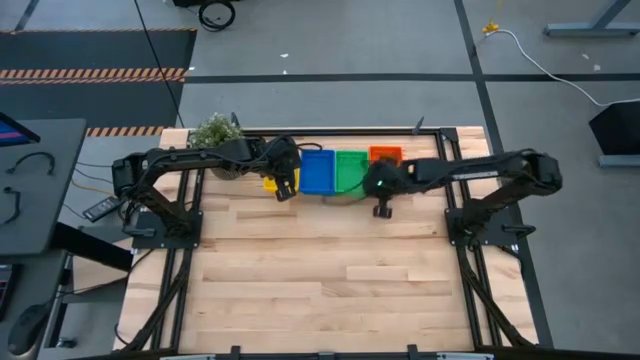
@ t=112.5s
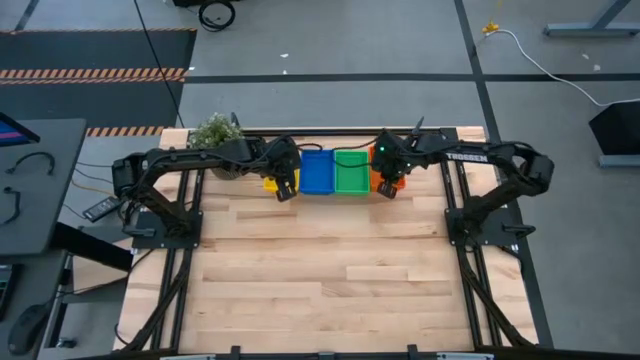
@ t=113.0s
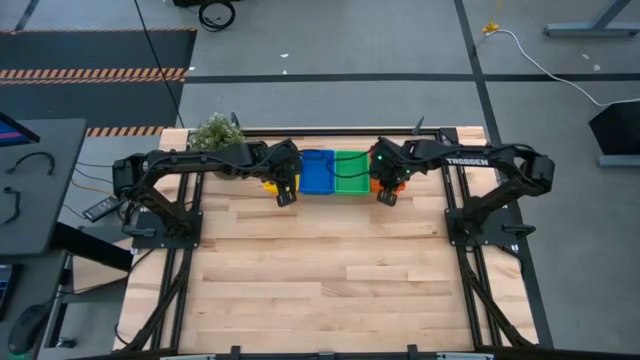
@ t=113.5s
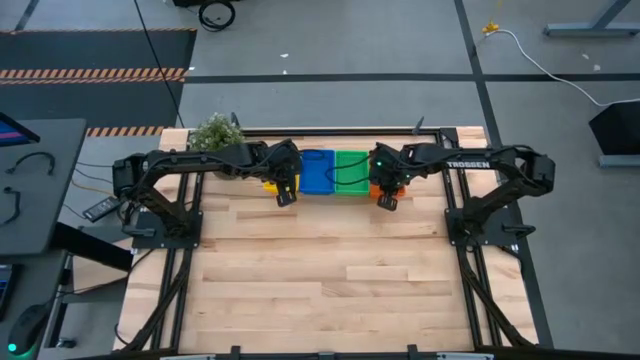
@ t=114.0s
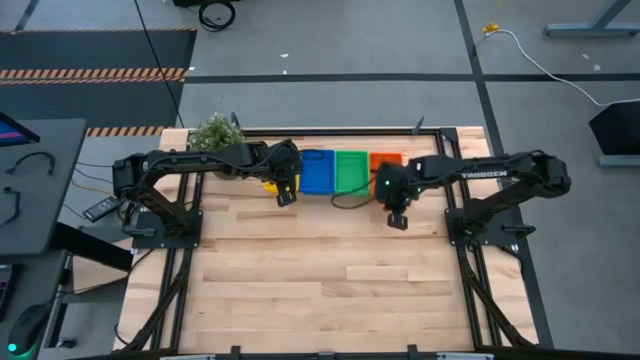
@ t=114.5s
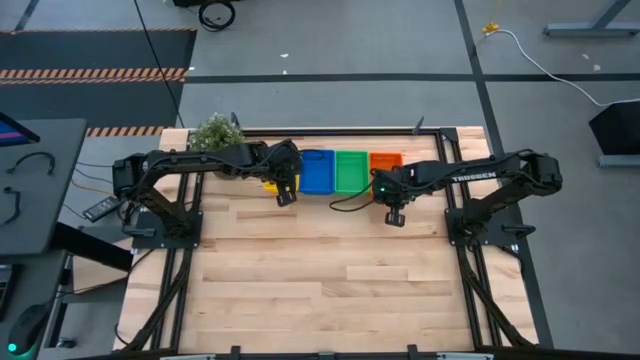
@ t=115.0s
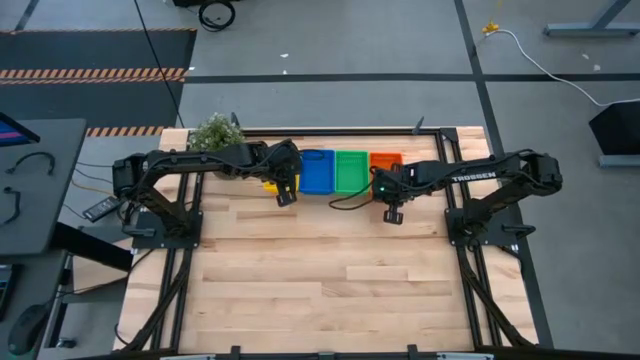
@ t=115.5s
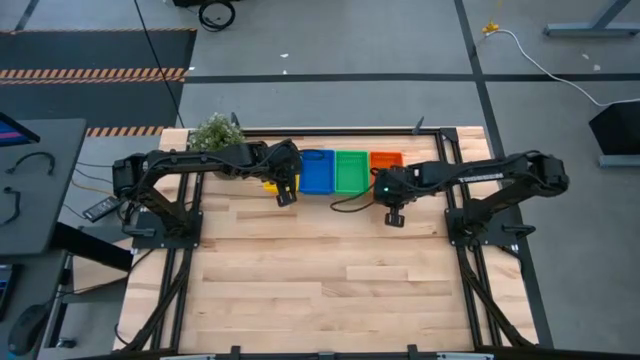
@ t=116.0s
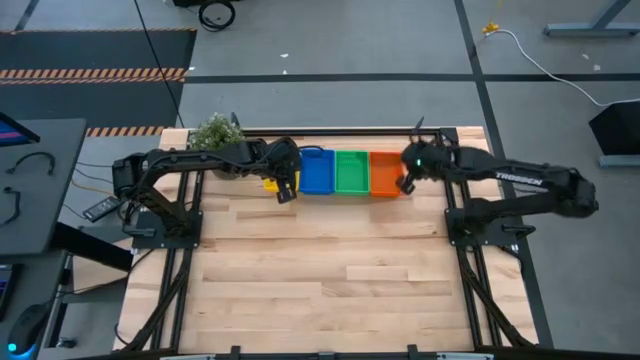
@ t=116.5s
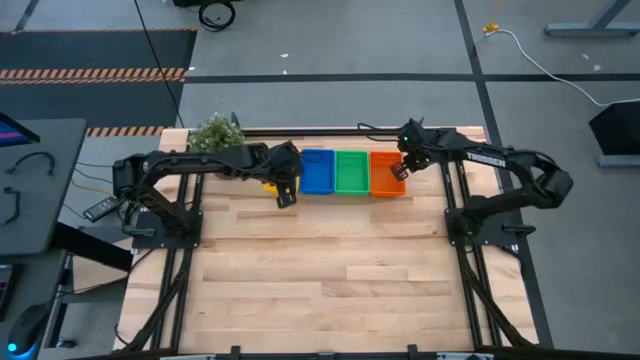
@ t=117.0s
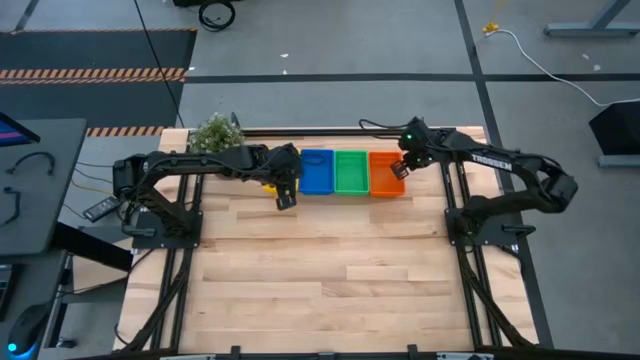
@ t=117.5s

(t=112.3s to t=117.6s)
Adjust the stacked orange bins

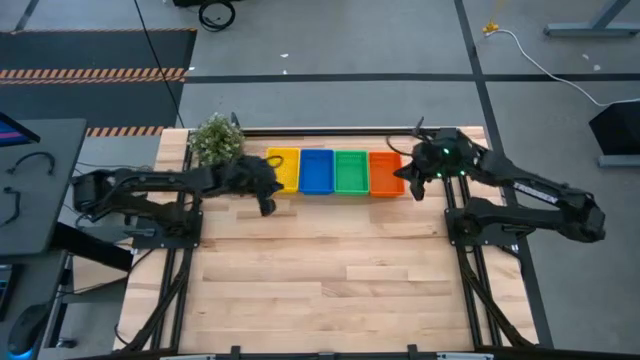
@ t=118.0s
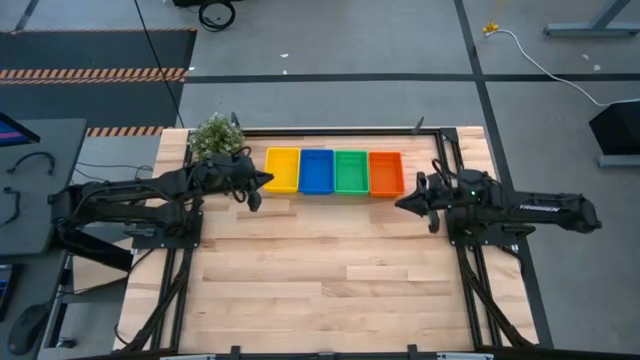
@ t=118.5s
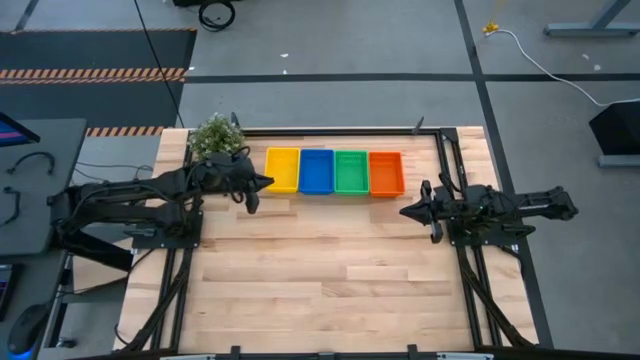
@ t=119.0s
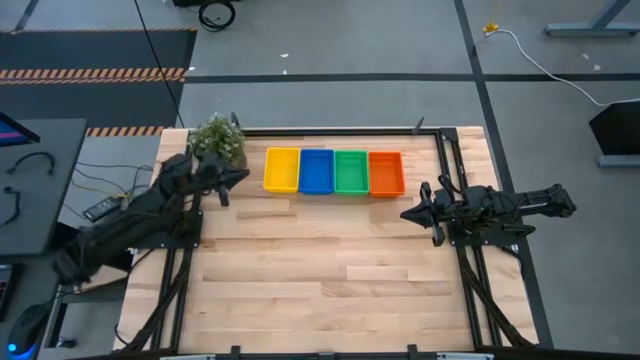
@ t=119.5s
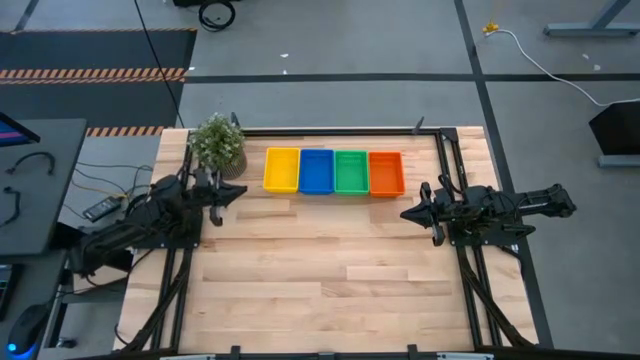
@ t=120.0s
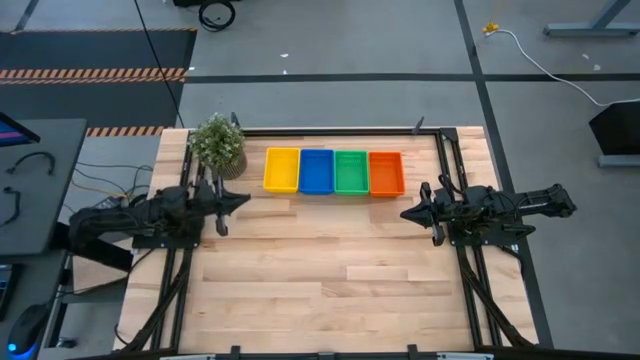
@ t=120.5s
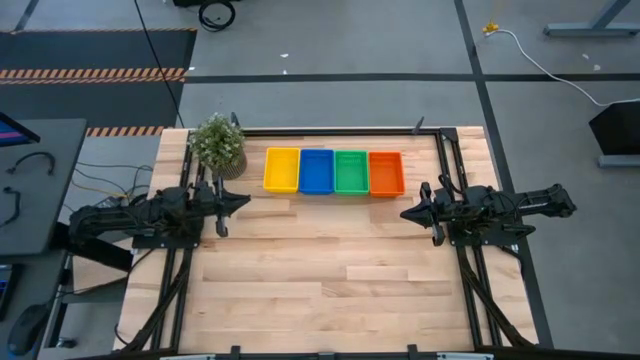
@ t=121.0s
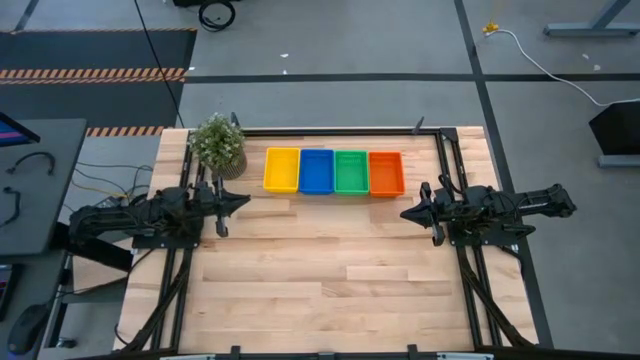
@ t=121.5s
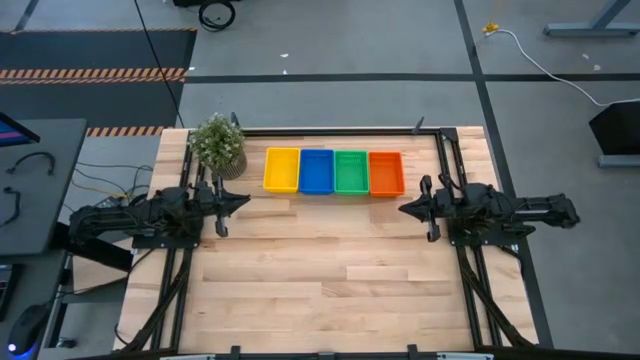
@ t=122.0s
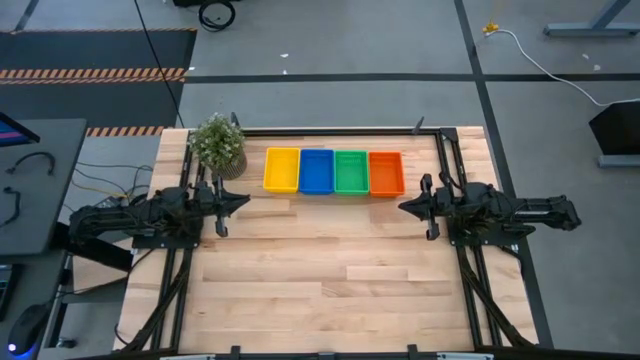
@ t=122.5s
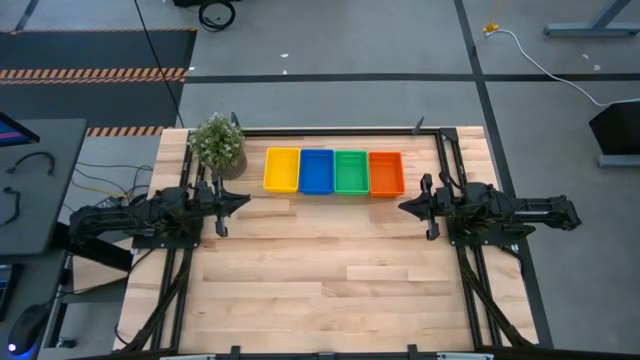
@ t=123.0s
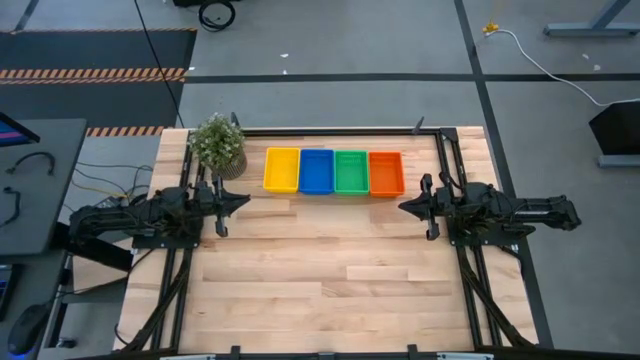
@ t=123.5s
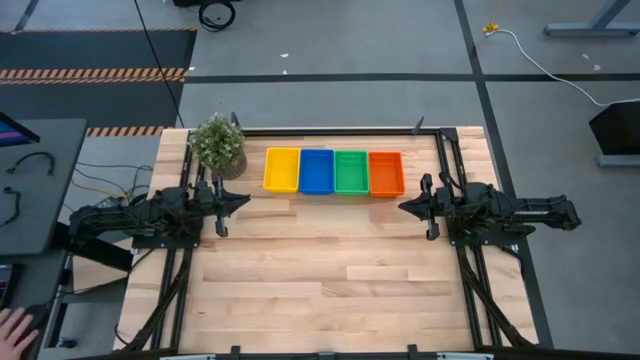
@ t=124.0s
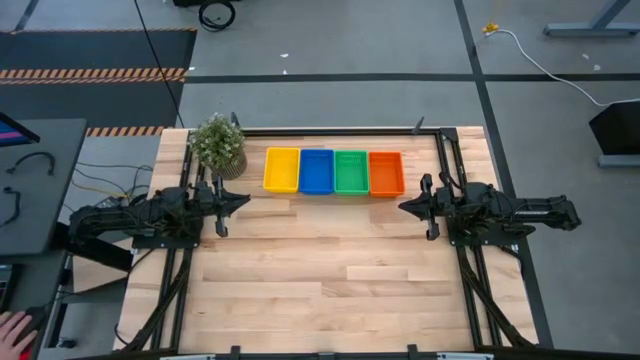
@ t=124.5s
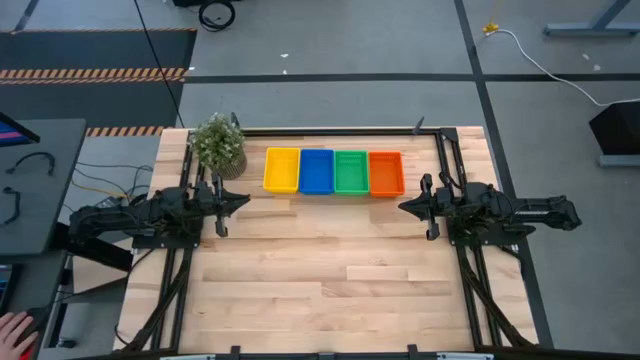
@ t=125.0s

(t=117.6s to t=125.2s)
Return to Home Position

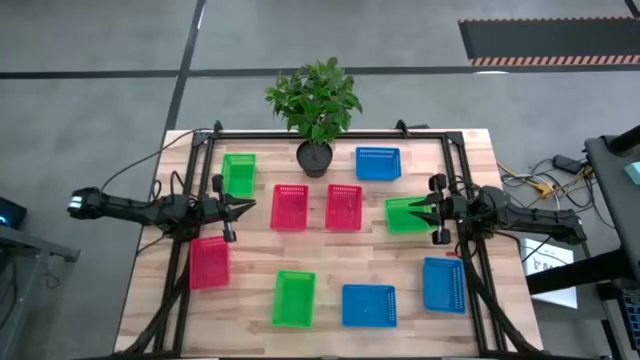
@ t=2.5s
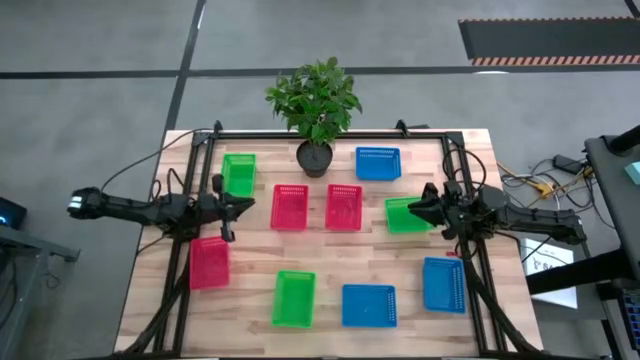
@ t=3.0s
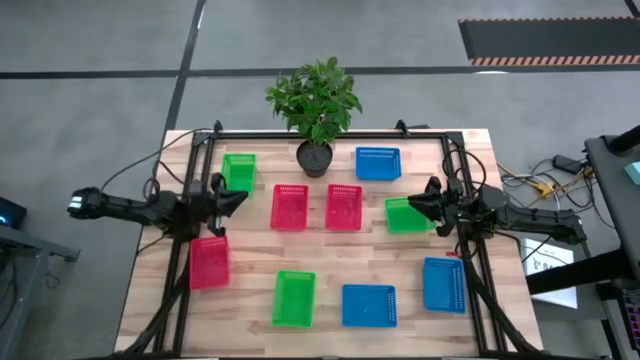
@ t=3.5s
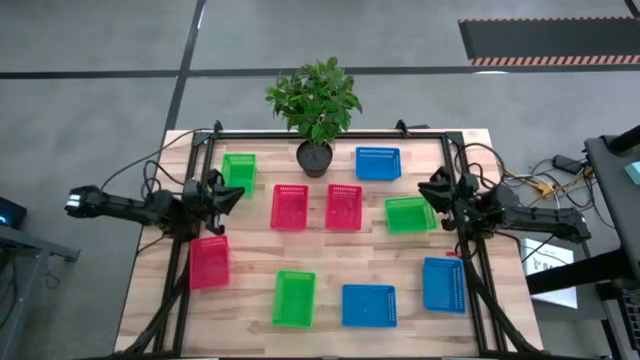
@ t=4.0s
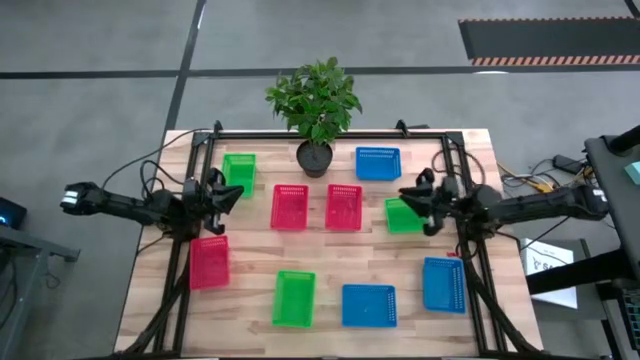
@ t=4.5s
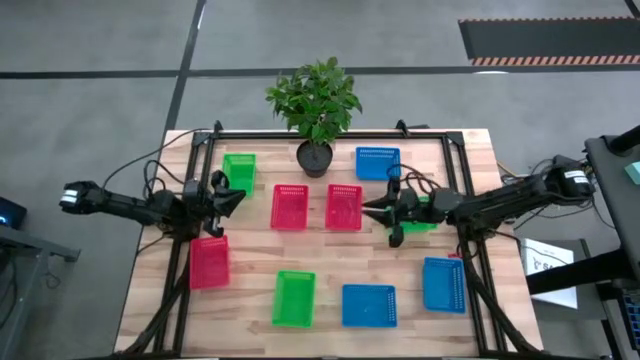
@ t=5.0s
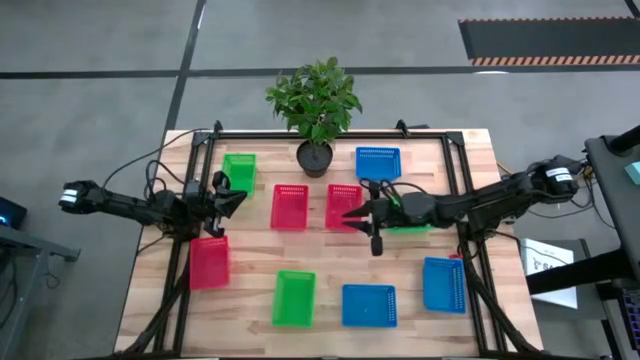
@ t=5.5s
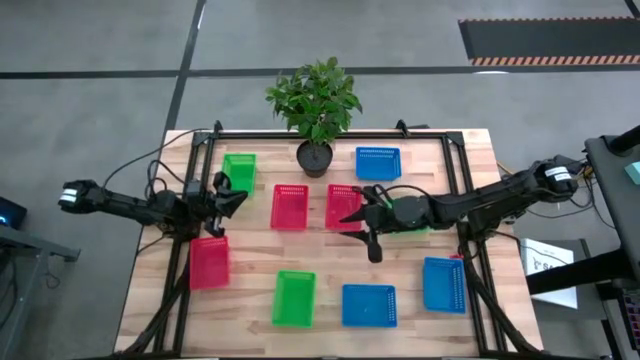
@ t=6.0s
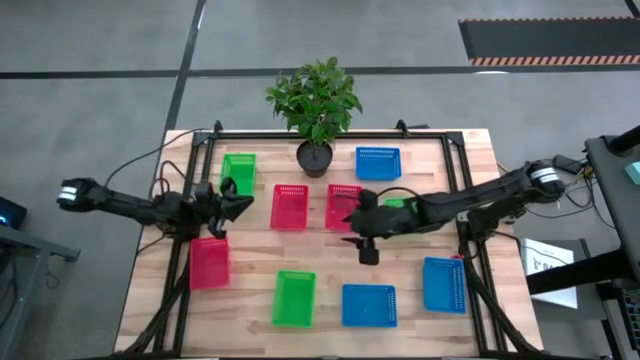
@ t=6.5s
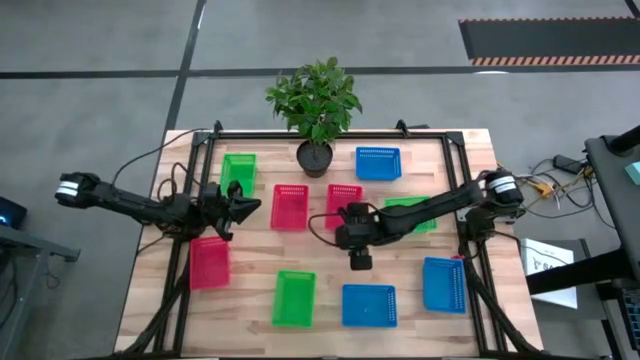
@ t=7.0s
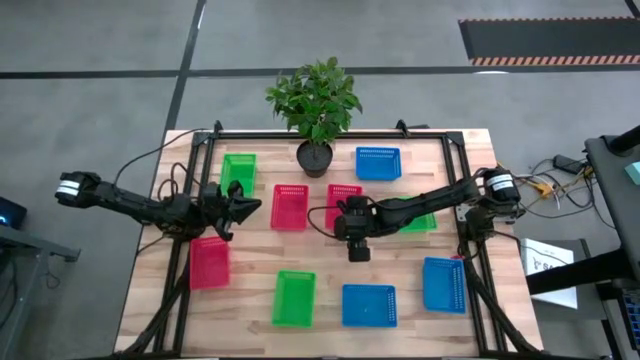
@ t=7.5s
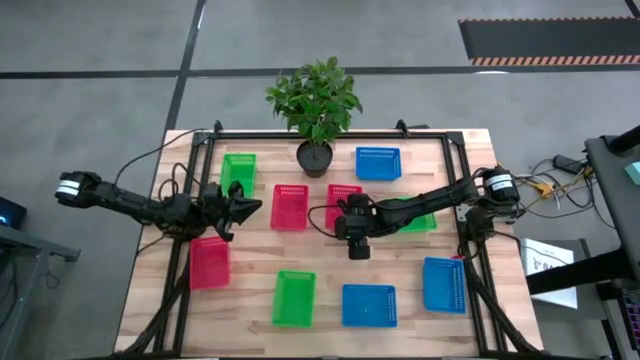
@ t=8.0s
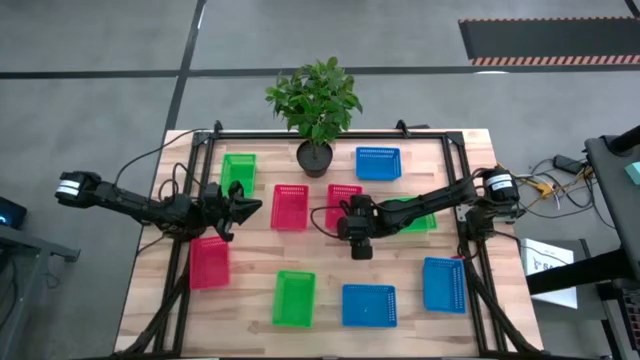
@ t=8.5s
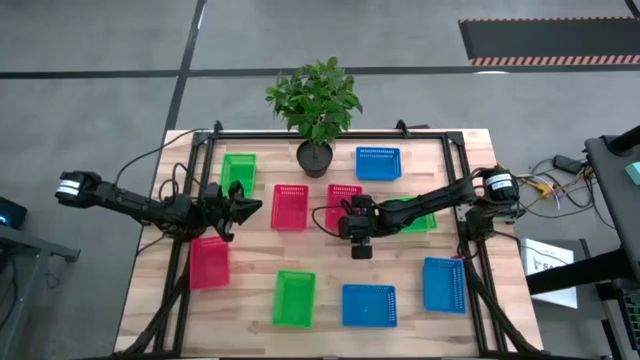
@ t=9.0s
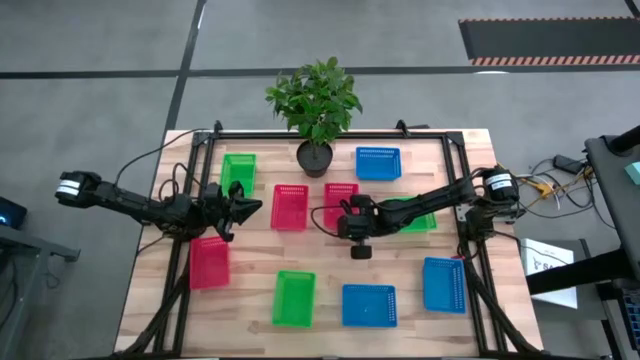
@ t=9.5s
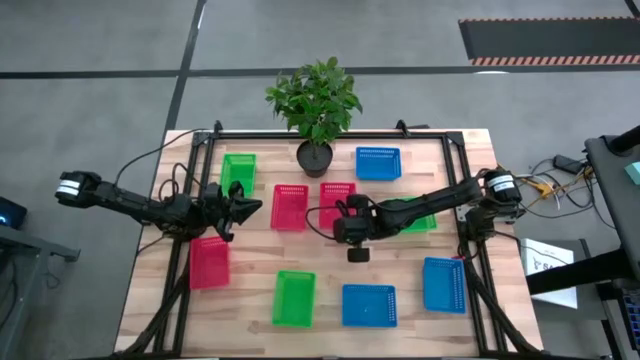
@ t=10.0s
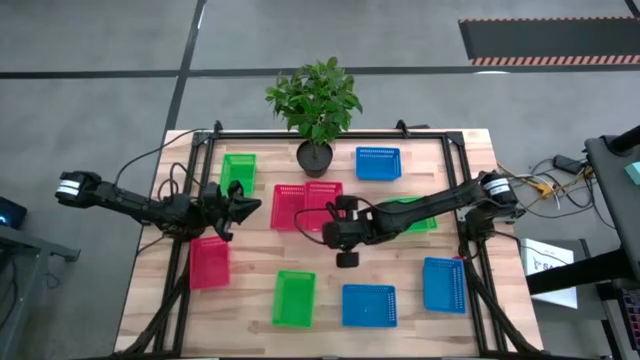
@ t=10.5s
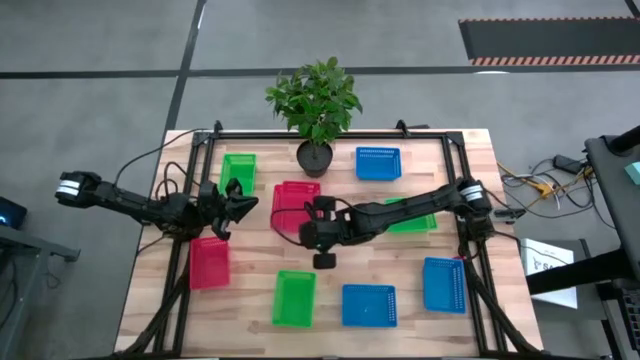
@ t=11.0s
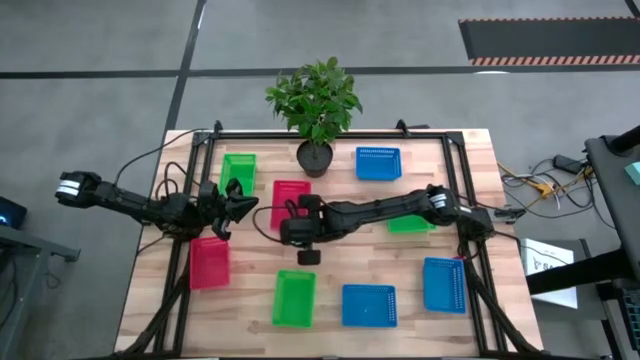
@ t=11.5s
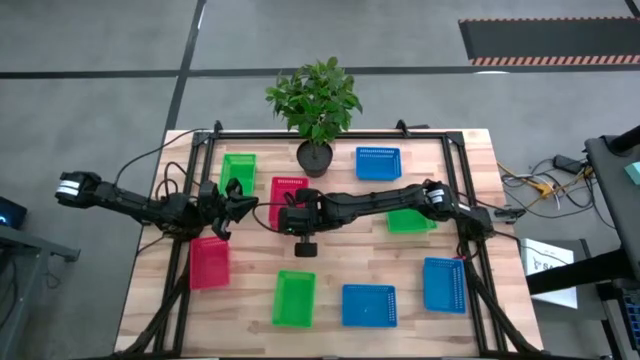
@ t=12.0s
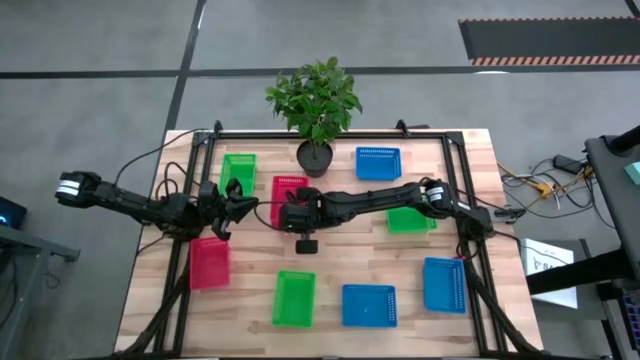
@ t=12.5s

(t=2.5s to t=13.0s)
Stack the top right red basket on top of the top left red basket
